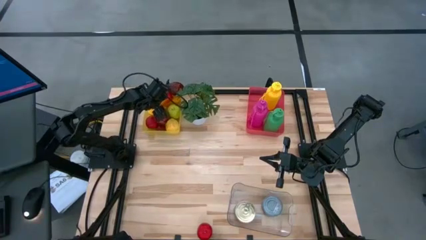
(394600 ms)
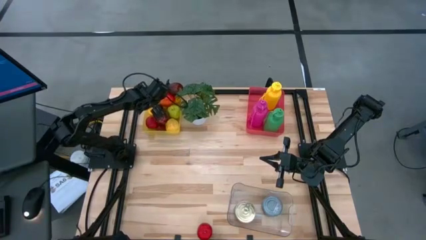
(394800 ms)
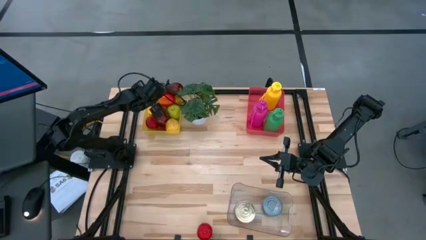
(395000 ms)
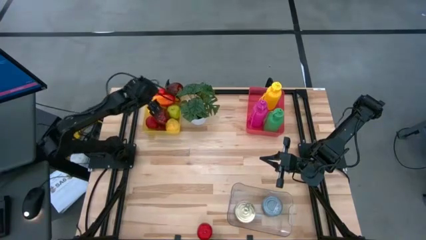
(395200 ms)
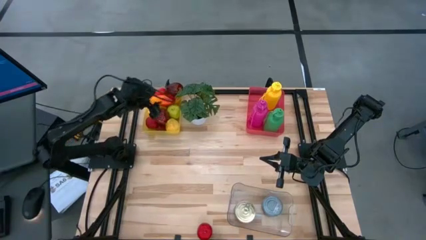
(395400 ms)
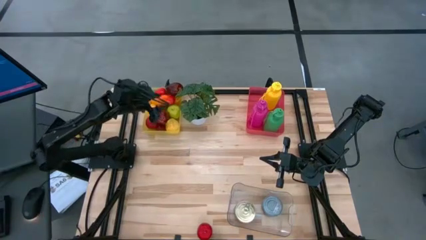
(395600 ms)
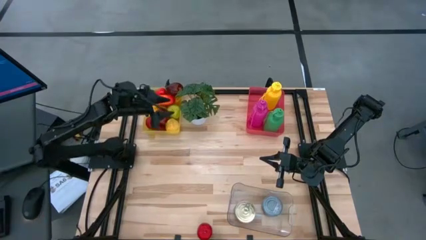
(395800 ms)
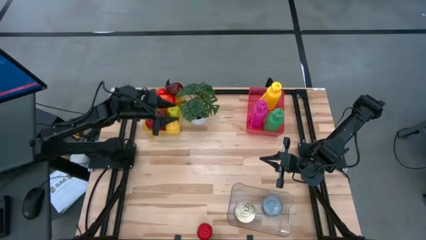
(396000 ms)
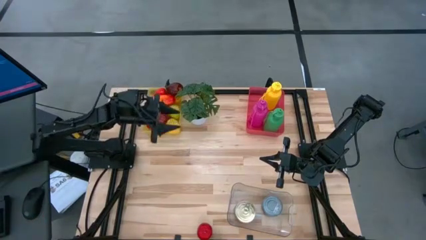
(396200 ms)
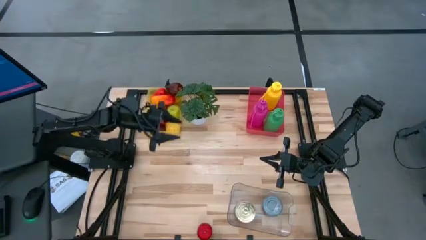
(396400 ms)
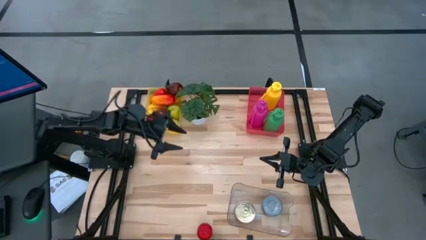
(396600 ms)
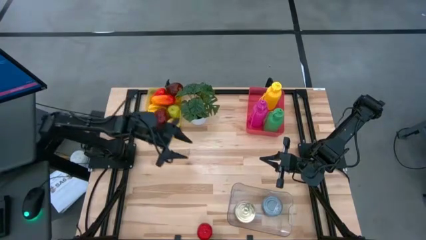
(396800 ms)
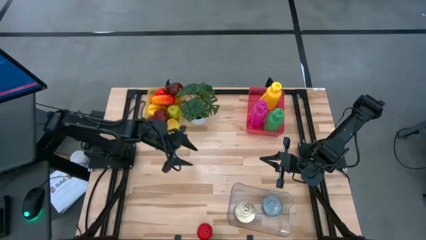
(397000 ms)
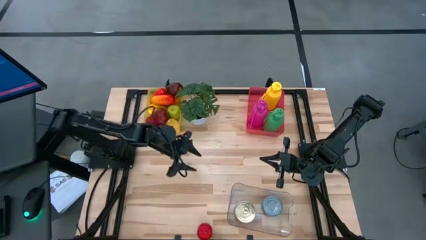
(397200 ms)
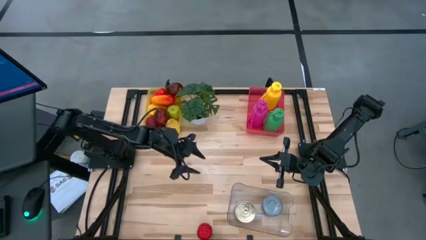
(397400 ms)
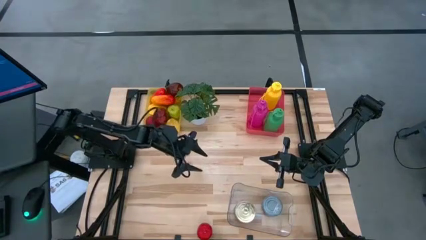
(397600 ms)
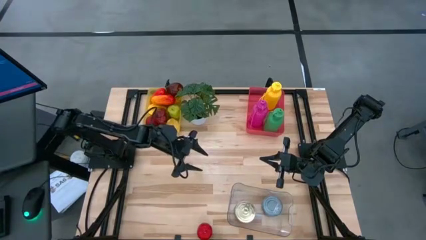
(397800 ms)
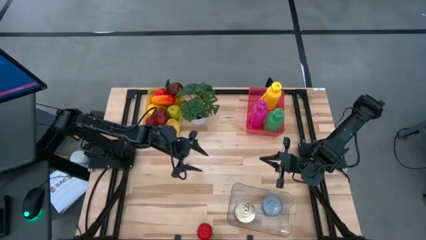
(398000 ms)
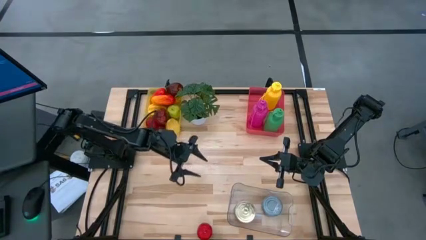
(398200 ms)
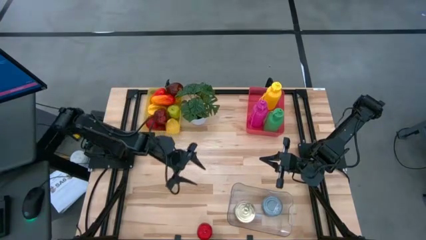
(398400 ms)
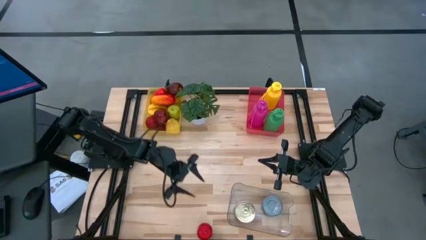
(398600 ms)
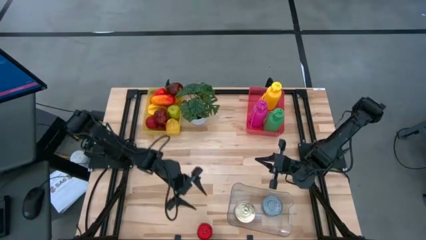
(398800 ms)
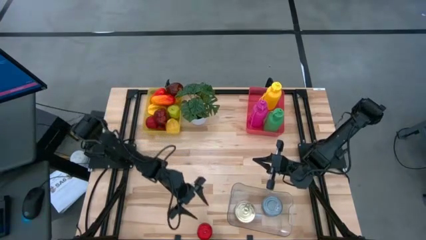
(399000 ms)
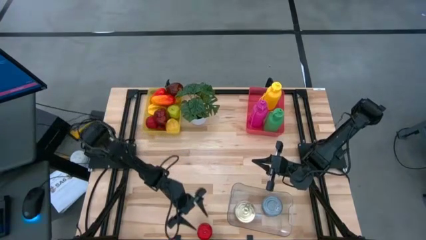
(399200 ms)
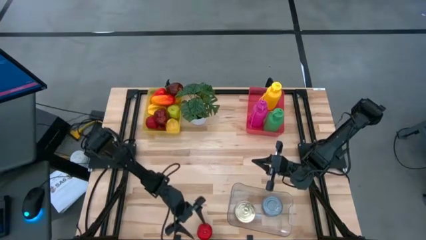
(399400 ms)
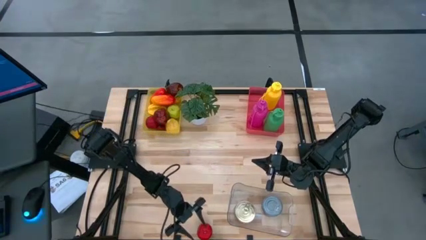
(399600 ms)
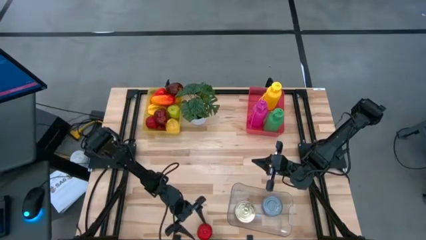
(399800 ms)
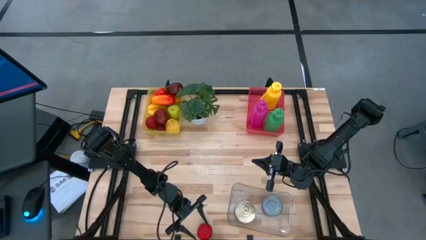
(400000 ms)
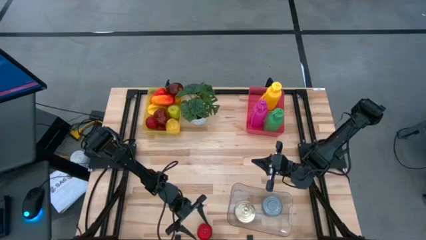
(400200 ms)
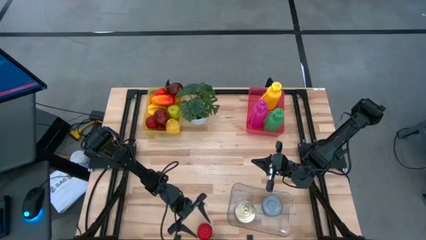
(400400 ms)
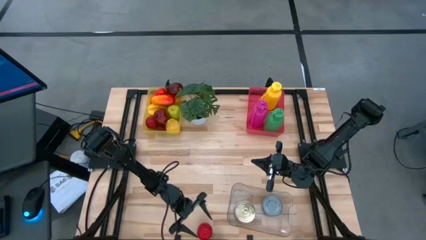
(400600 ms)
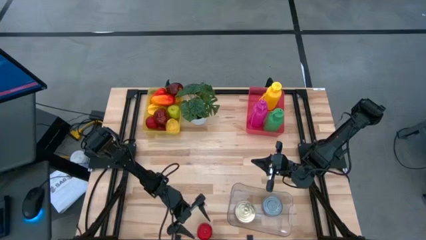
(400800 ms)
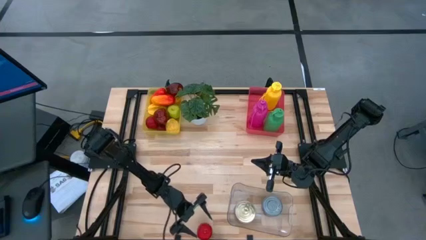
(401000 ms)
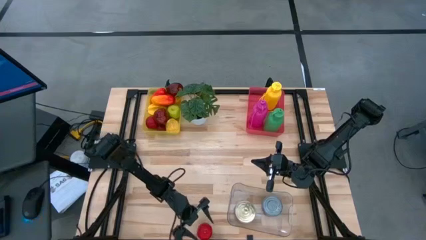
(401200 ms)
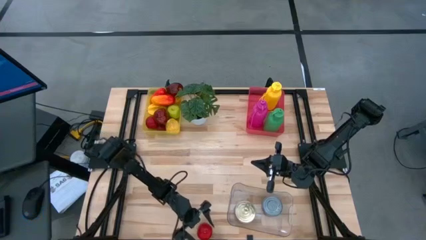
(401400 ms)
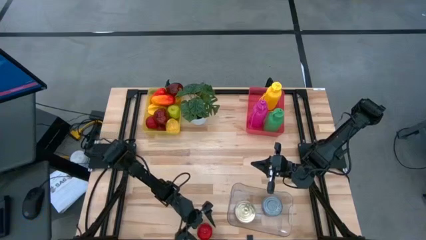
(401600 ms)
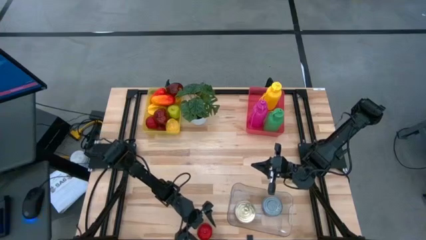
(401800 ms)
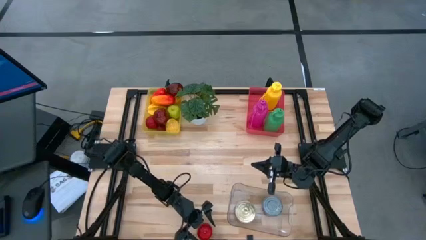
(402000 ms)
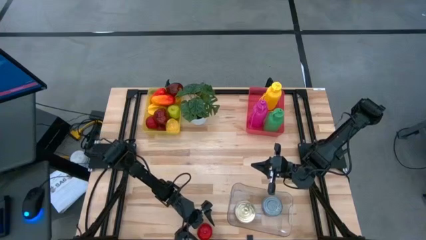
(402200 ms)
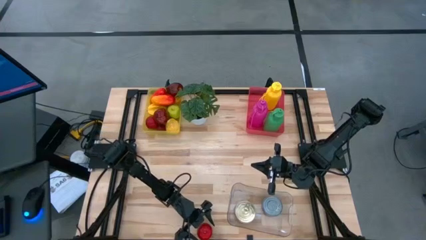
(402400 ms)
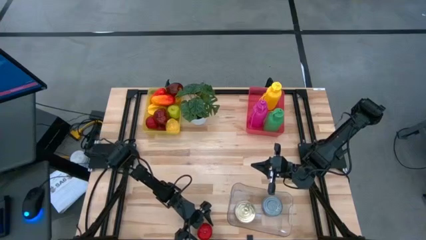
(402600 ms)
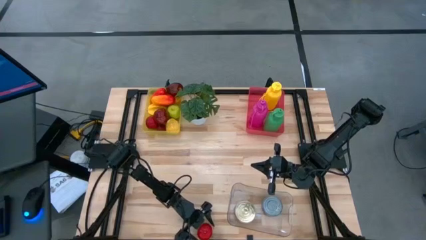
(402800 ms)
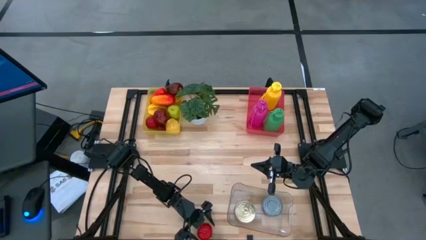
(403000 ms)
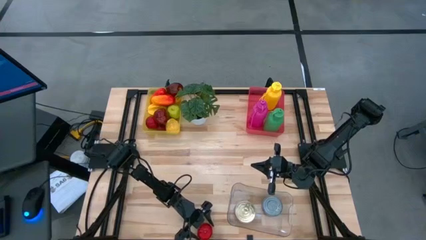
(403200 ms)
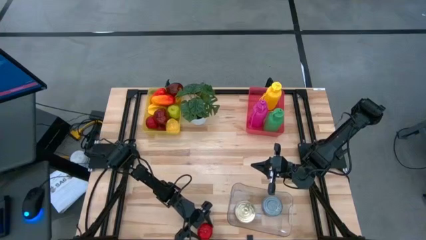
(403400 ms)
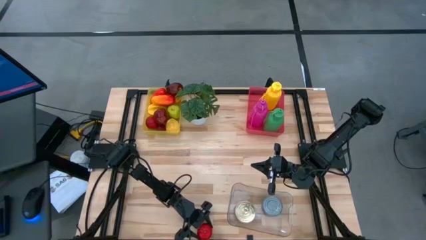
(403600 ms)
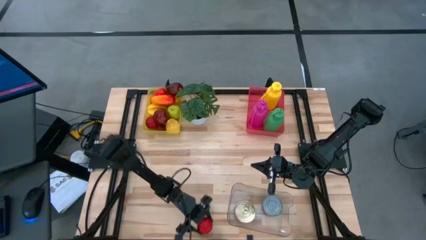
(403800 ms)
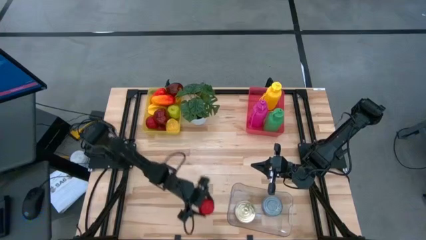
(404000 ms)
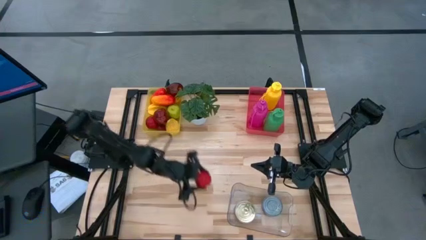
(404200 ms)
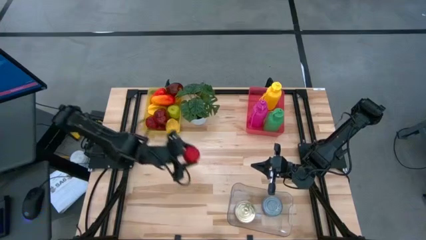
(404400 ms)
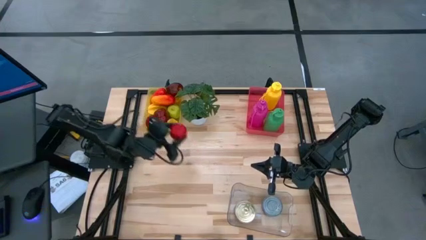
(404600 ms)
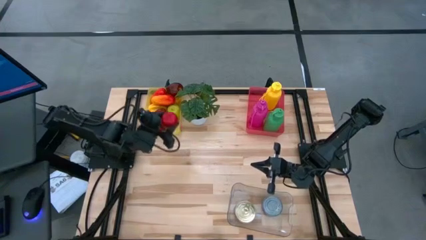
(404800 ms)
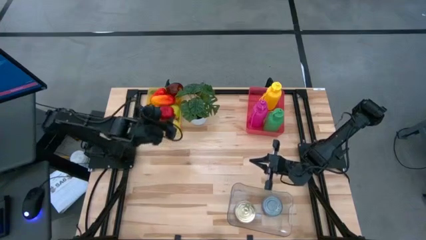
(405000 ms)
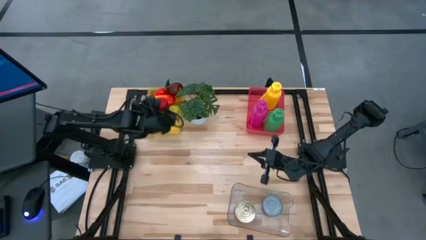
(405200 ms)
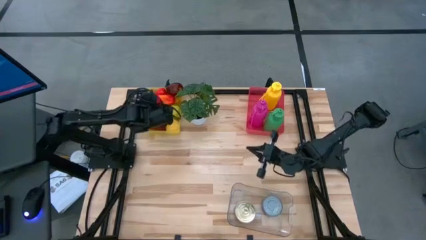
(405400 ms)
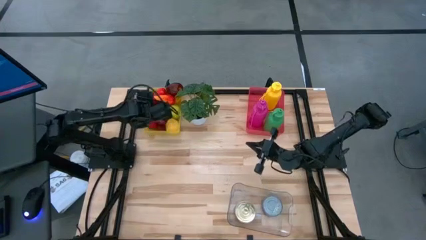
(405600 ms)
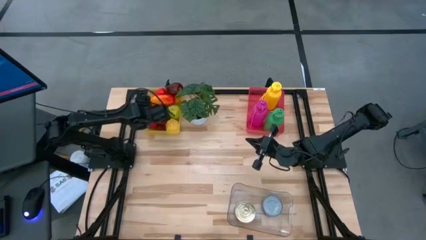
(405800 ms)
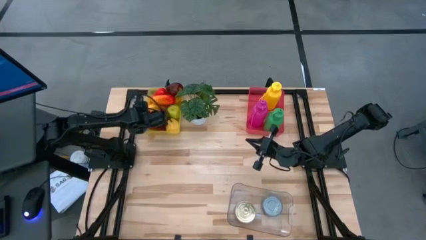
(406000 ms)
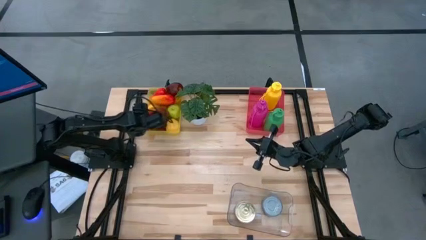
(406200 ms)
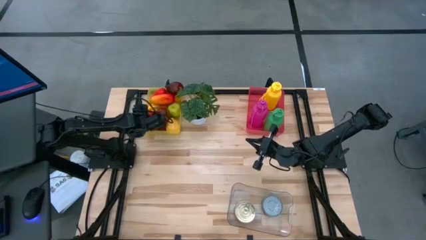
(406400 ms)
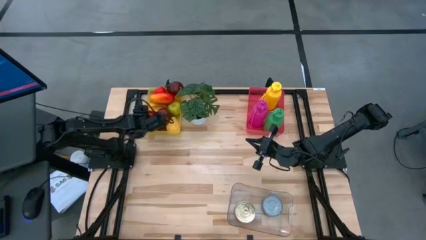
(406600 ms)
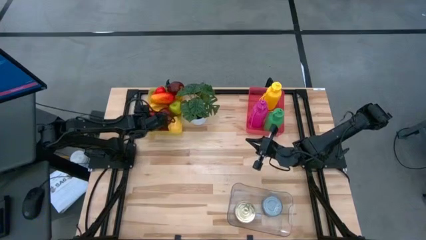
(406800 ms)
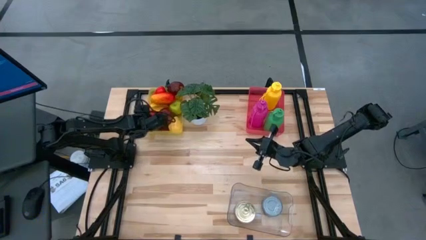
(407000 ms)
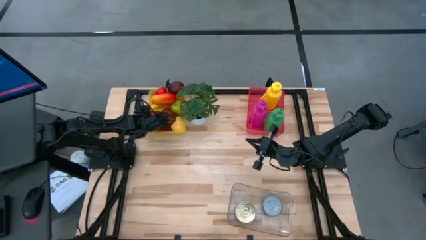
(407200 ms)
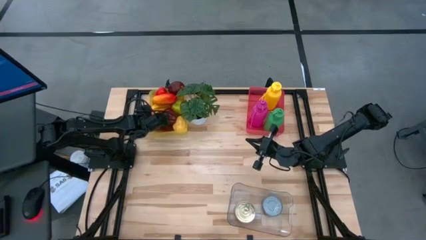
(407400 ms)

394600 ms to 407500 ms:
Task: Pick & Place Food Item
Put the red apple into the yellow bin

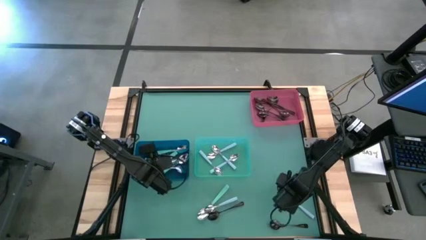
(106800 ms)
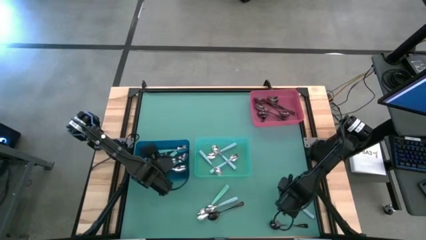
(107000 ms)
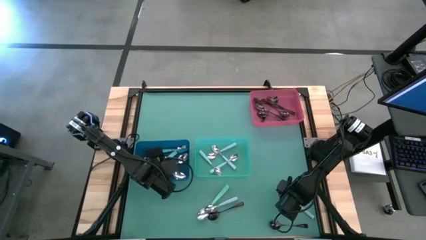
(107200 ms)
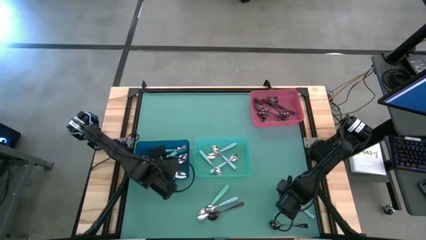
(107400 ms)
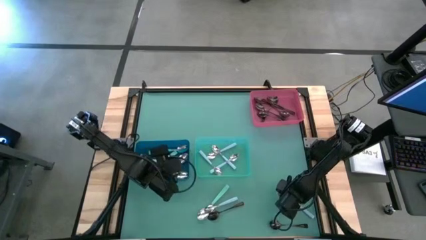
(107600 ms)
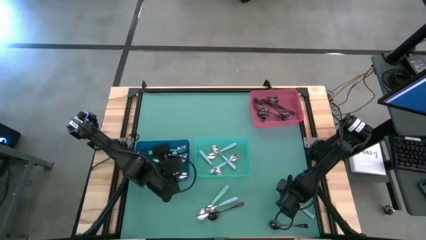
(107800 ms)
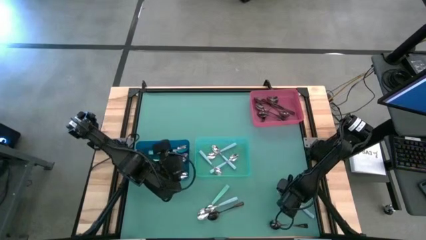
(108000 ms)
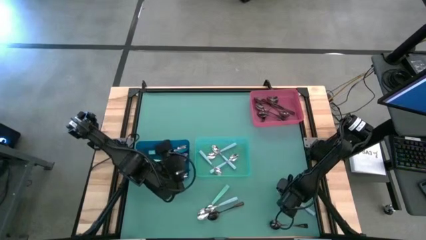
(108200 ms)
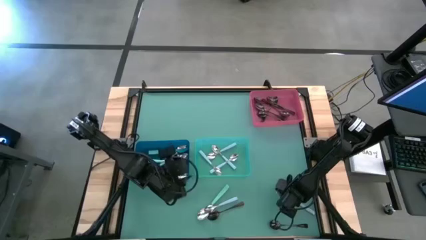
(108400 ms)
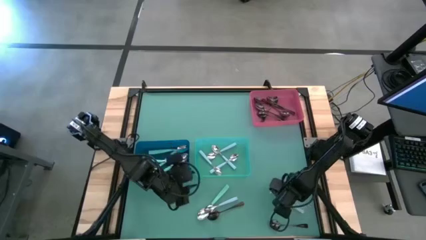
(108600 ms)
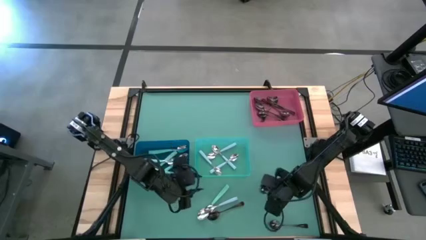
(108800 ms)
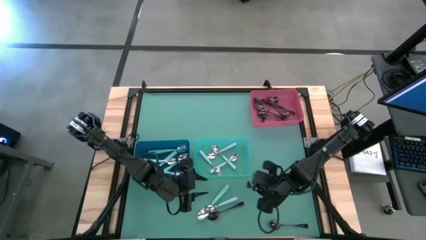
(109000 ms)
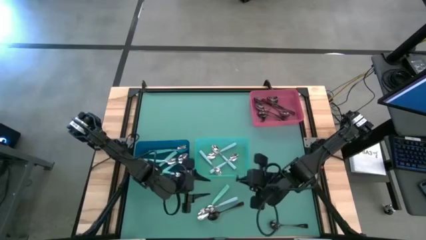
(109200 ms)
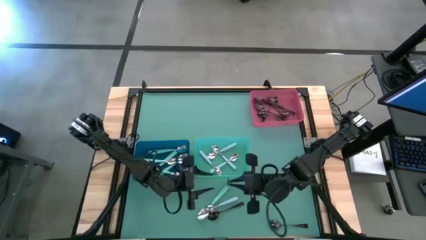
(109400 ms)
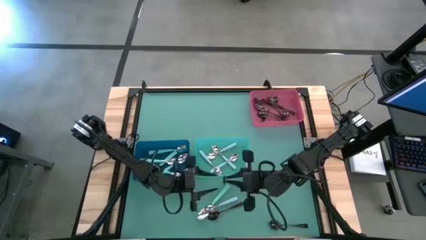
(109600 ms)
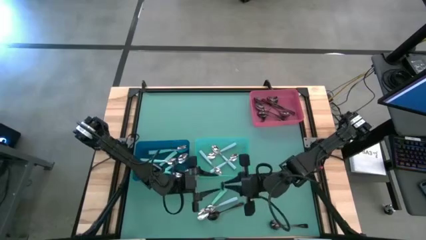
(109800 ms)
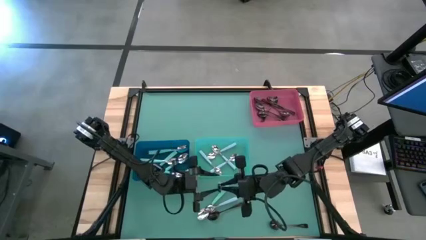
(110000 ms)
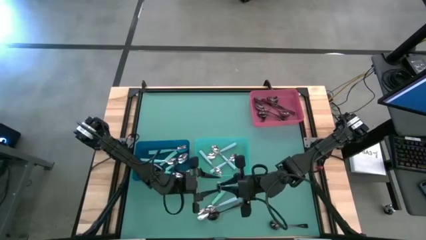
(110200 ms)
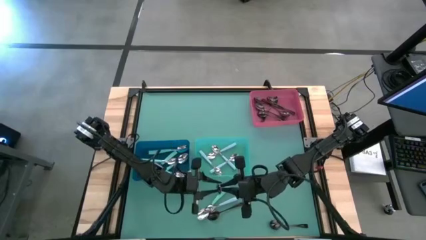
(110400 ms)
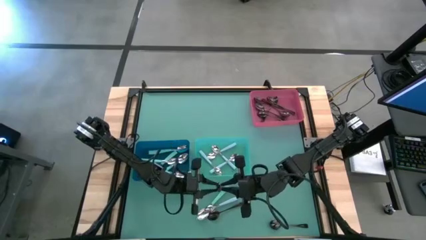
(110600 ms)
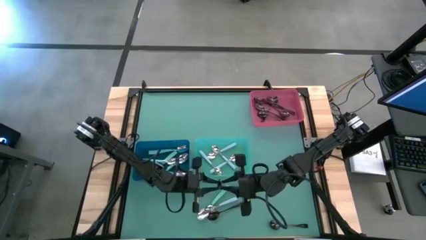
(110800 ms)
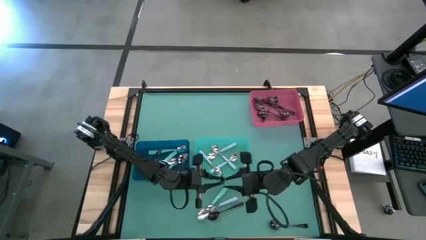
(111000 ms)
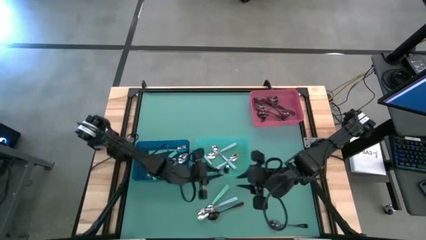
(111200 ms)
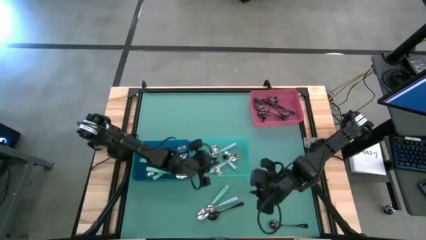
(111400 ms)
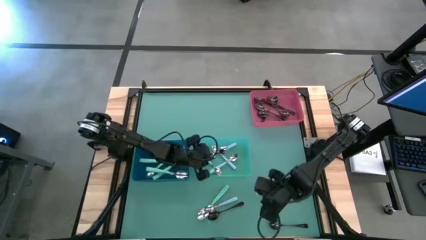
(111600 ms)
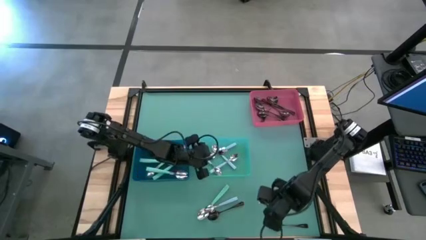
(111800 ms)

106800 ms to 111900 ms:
Task: Sort silverware by color (type)
Put the blue spoon into the green bin
